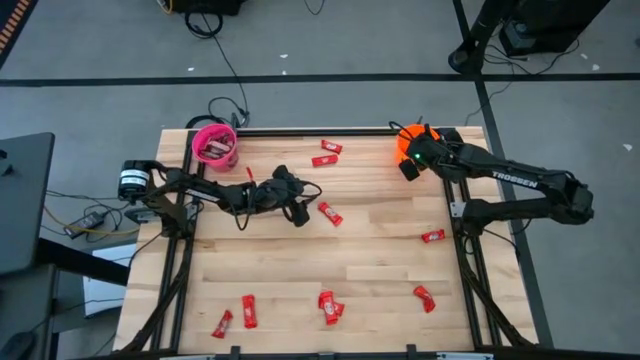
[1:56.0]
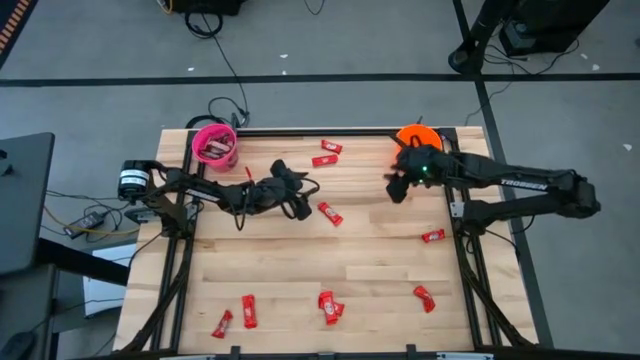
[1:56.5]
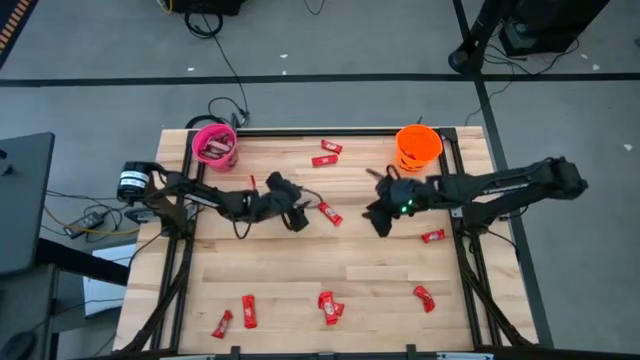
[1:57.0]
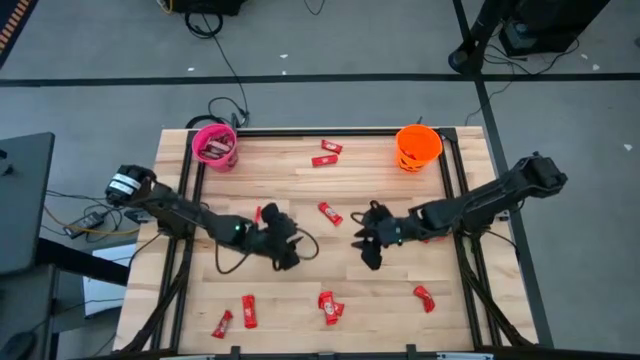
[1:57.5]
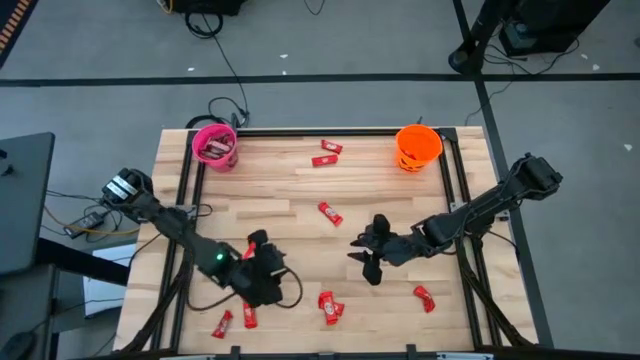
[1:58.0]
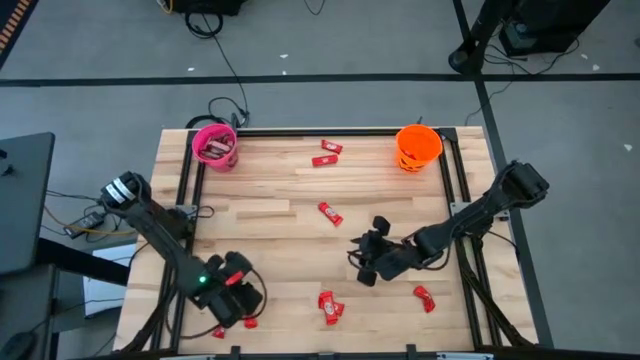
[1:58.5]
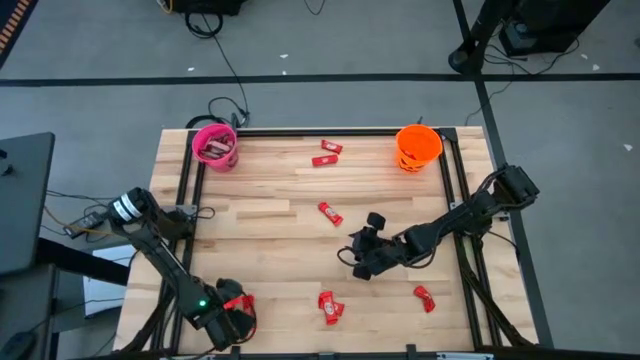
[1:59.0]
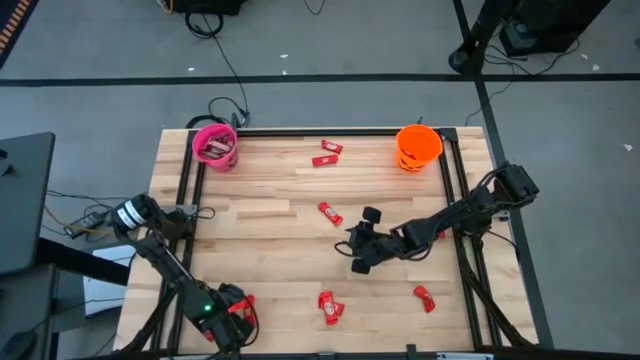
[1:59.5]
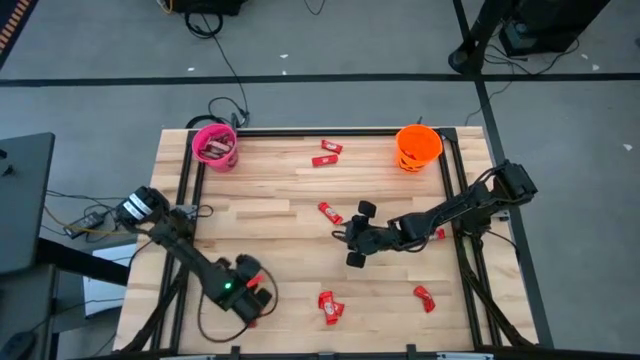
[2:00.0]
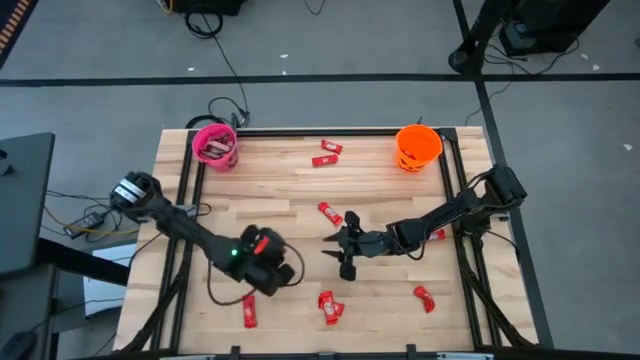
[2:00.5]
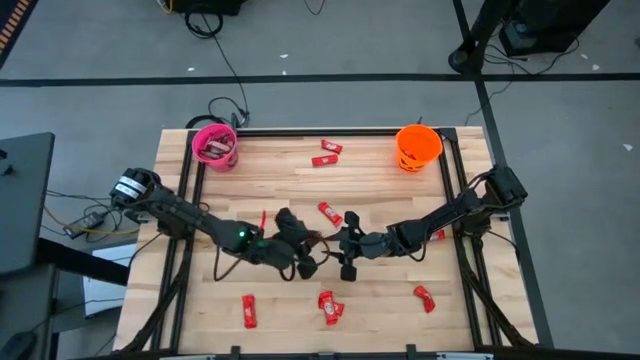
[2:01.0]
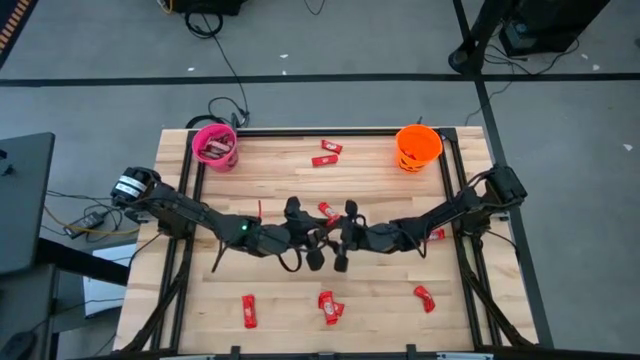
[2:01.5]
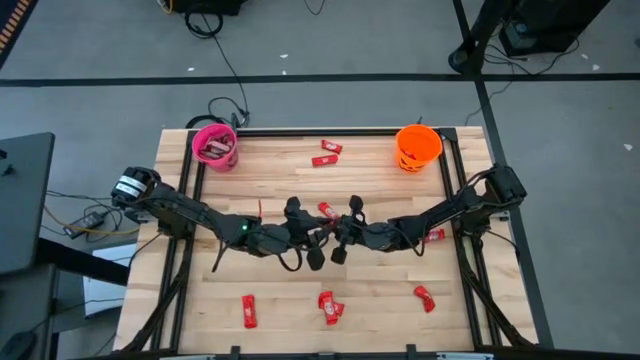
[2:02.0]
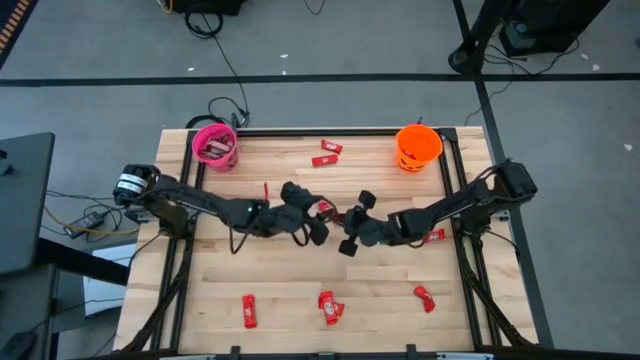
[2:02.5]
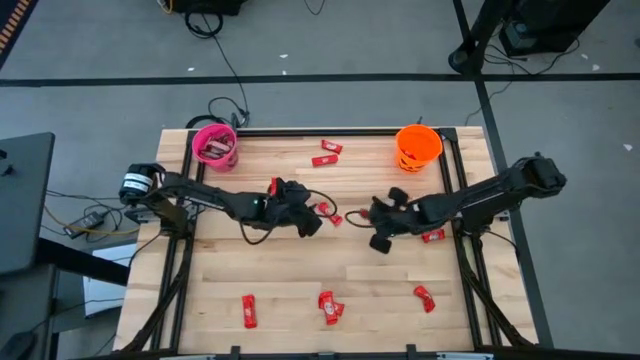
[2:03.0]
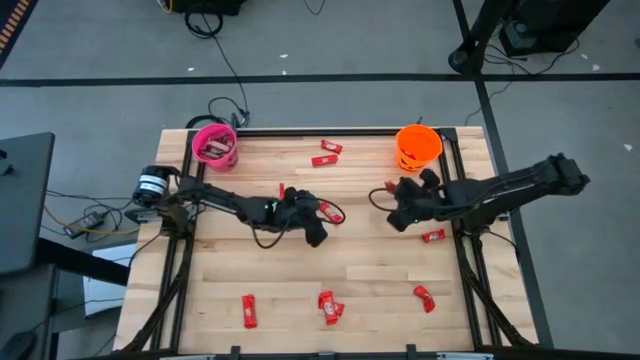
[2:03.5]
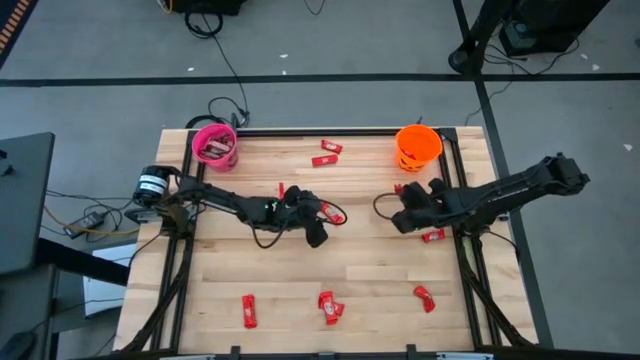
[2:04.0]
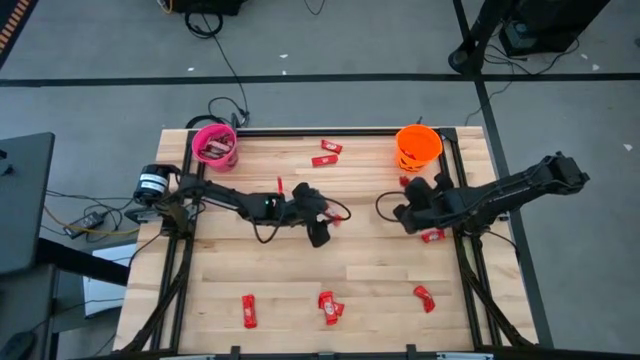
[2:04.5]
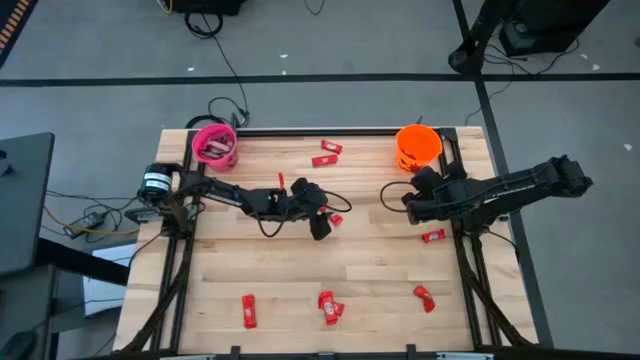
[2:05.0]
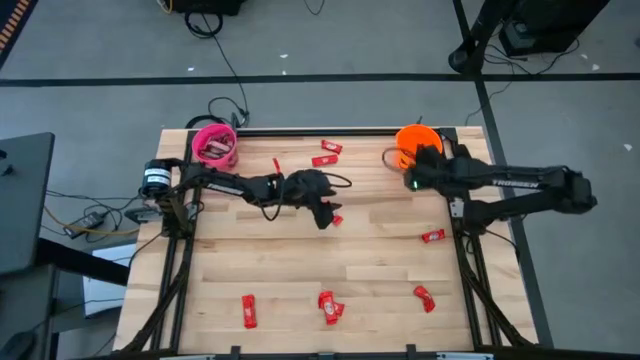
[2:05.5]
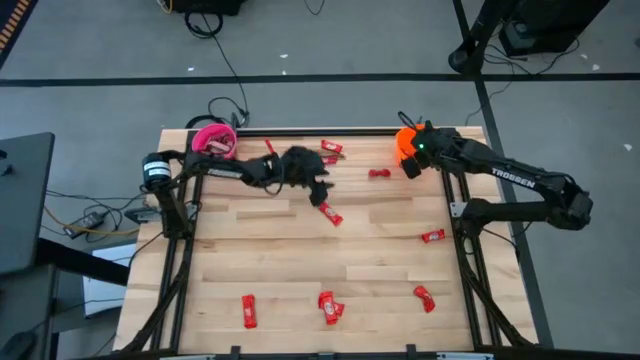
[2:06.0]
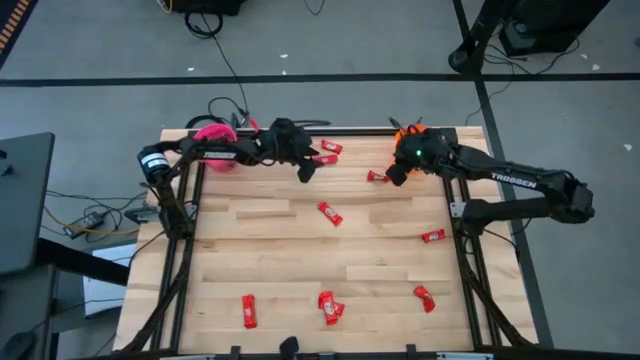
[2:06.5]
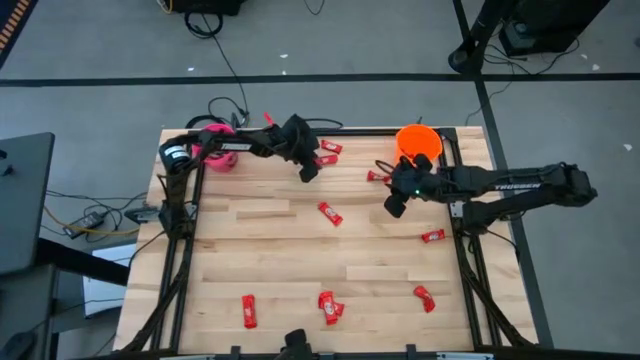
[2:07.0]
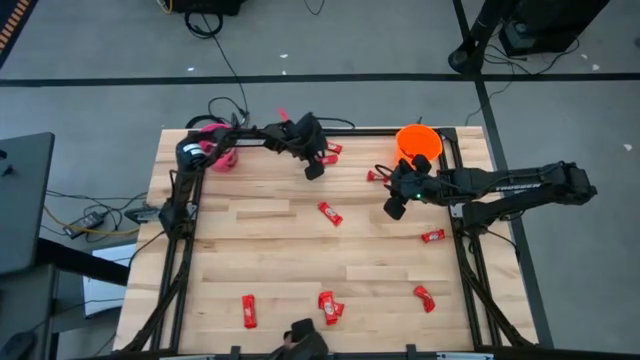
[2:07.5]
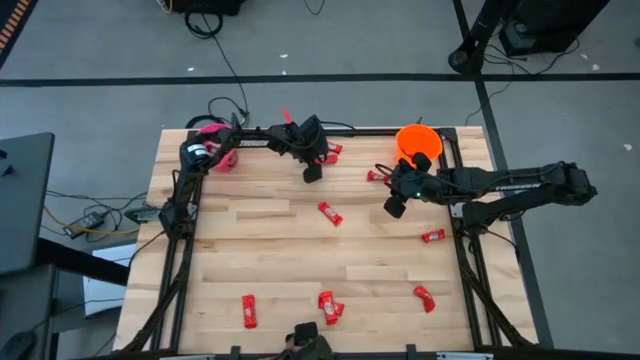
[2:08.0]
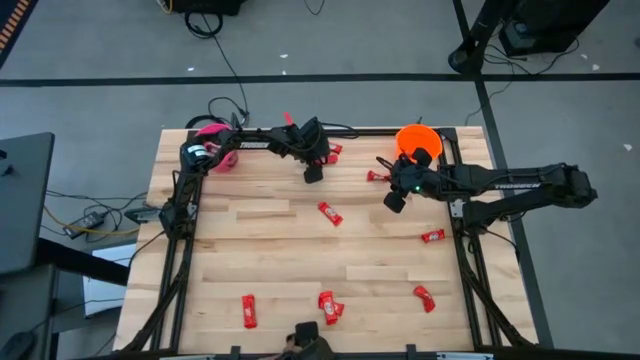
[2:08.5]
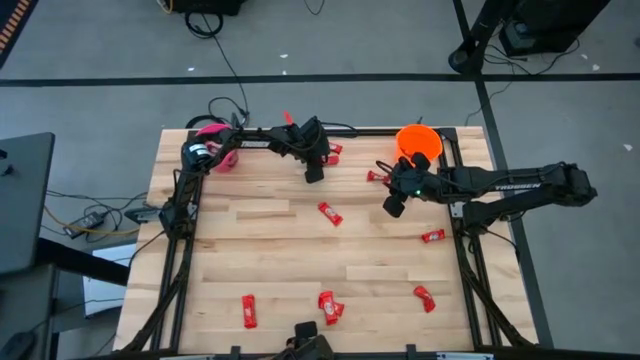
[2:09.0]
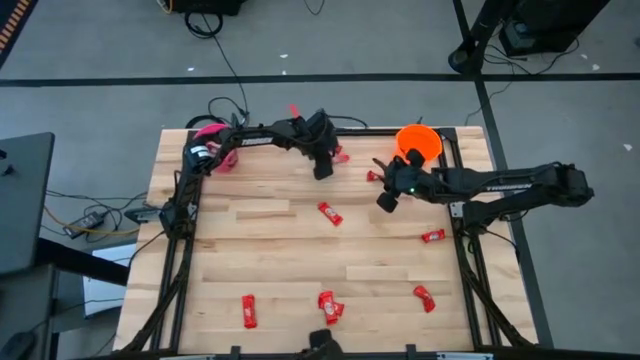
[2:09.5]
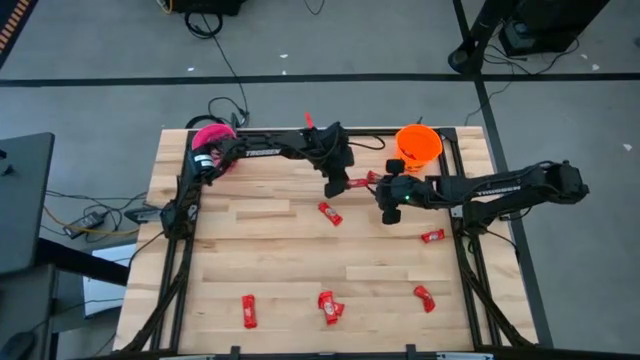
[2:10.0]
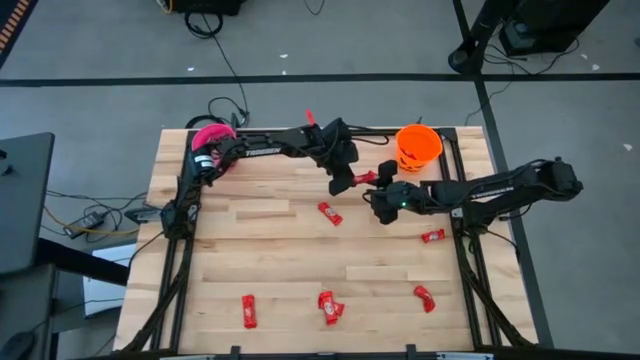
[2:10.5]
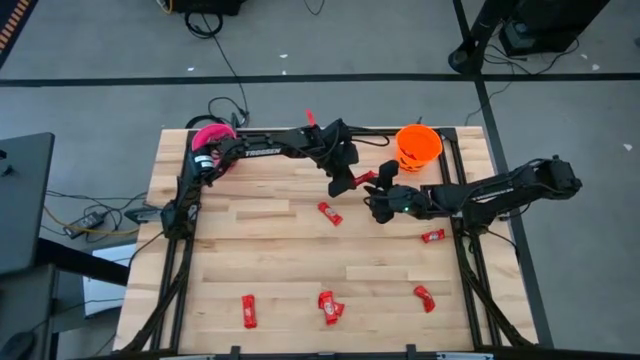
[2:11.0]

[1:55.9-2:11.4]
Task: Sort candy by brand, put in halloween buckets
Put the red chocolate bar into the orange bucket

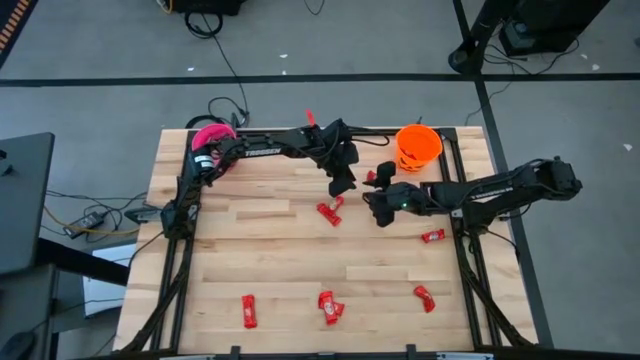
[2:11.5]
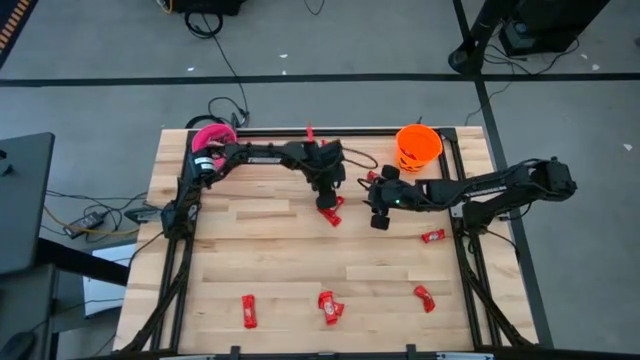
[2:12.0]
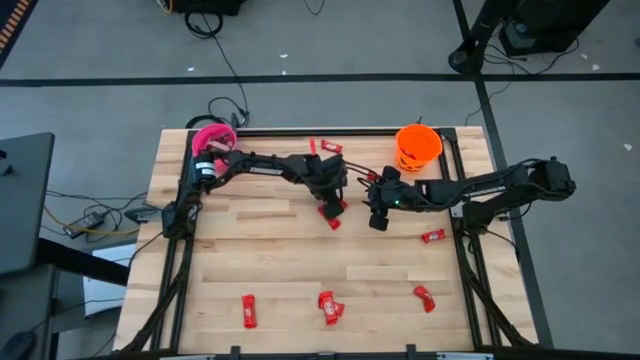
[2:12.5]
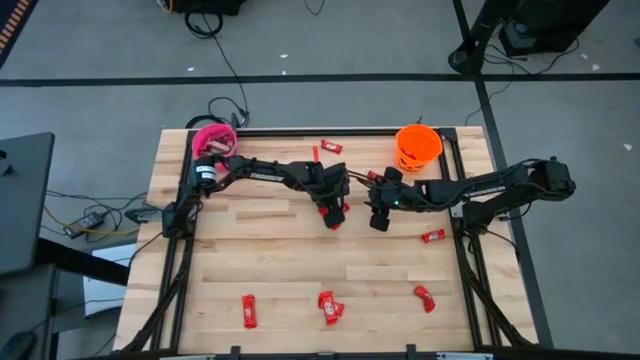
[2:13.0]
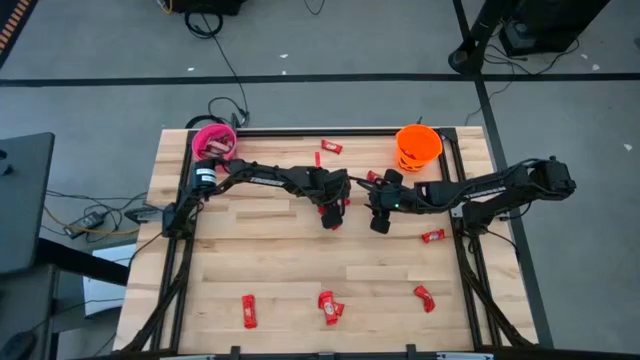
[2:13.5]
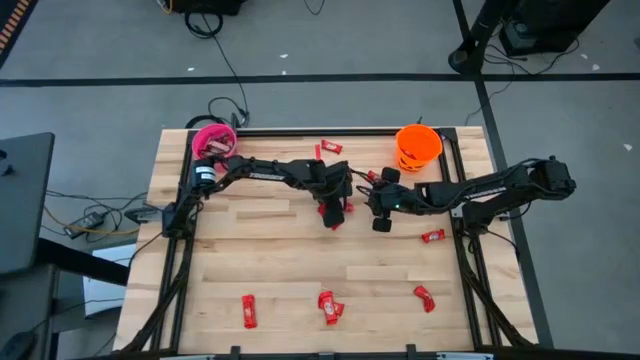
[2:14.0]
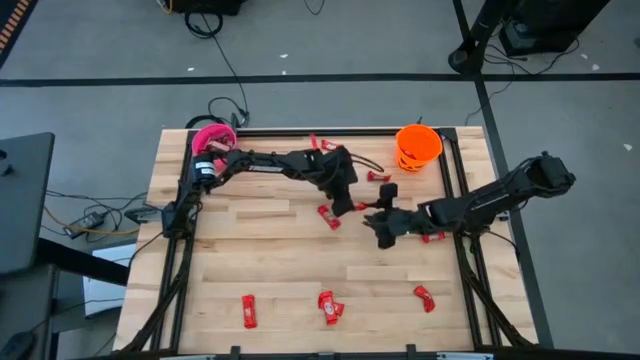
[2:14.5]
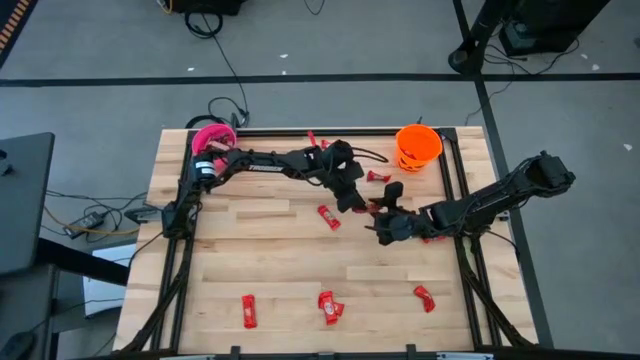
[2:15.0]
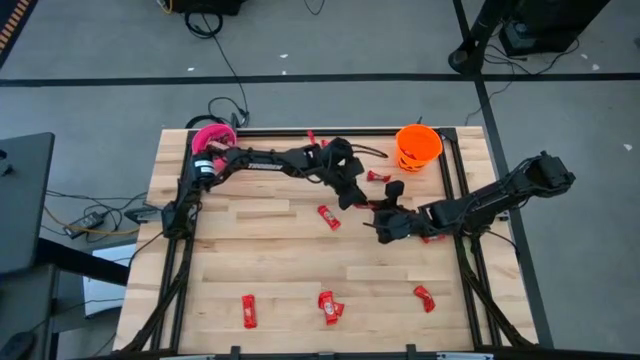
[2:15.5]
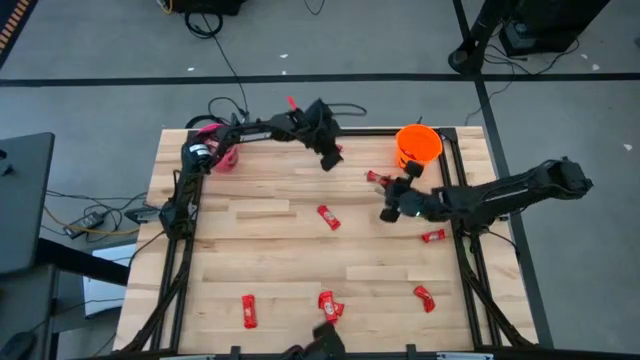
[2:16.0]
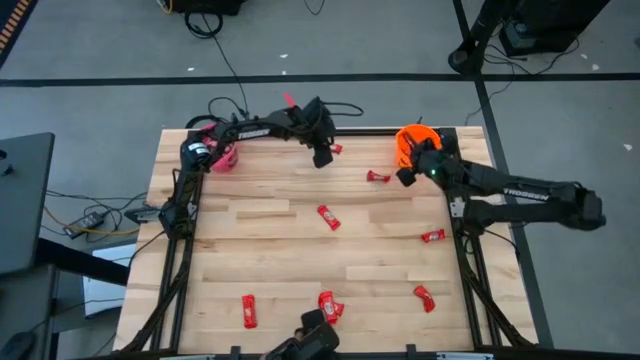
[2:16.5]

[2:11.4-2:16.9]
Put the red chocolate bar into the orange bucket
